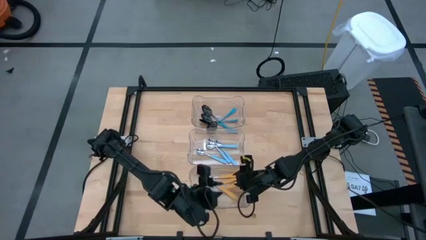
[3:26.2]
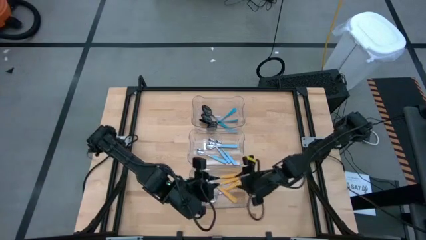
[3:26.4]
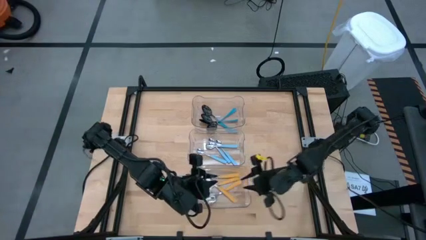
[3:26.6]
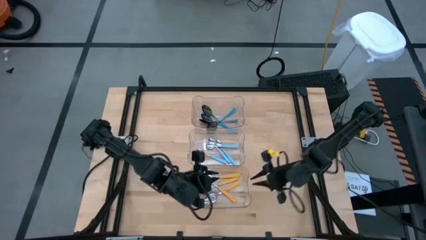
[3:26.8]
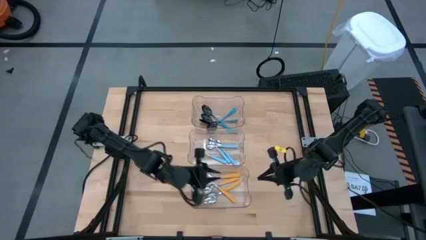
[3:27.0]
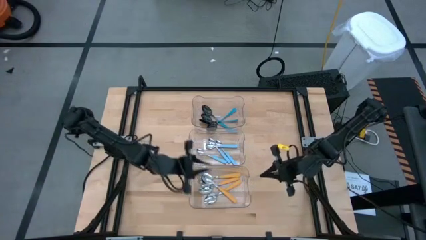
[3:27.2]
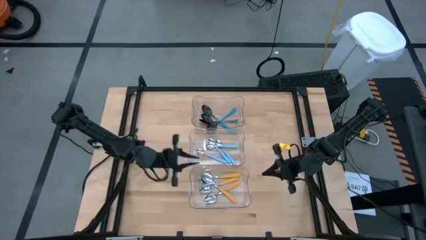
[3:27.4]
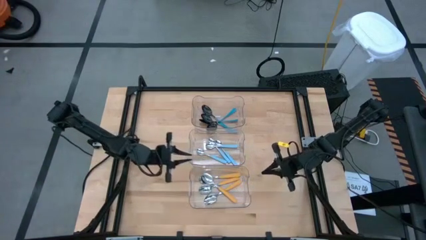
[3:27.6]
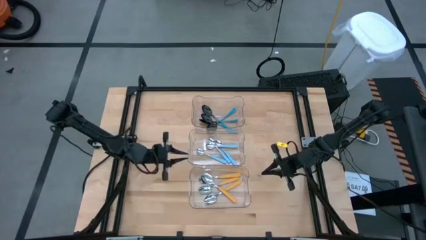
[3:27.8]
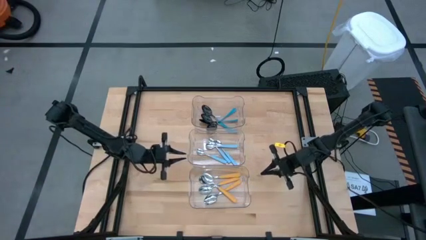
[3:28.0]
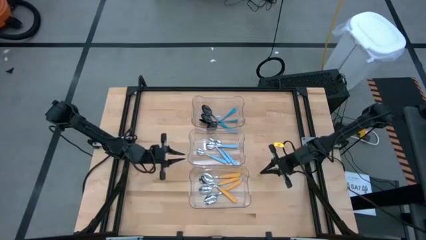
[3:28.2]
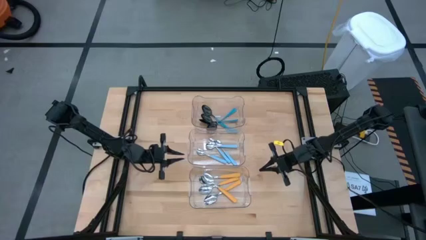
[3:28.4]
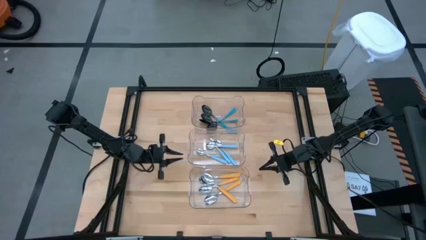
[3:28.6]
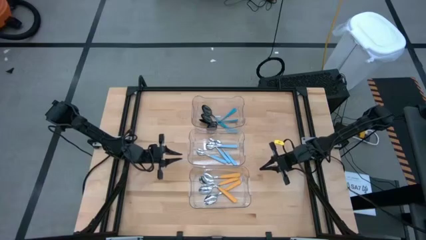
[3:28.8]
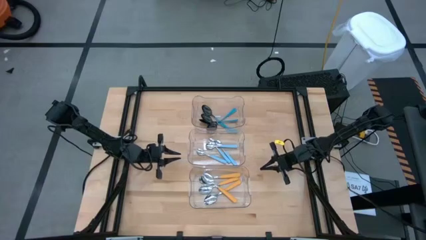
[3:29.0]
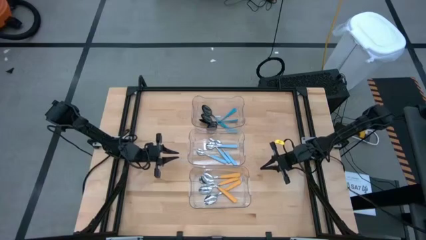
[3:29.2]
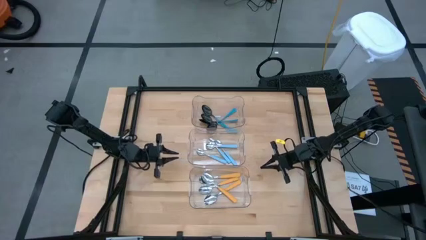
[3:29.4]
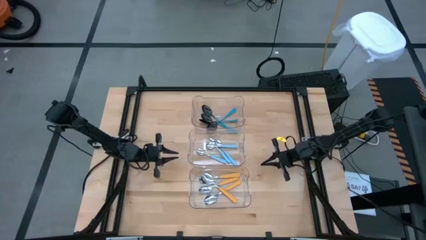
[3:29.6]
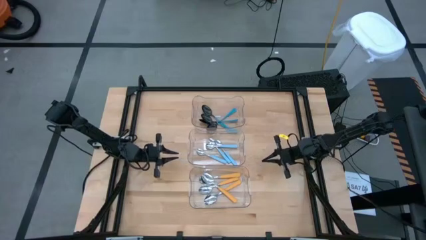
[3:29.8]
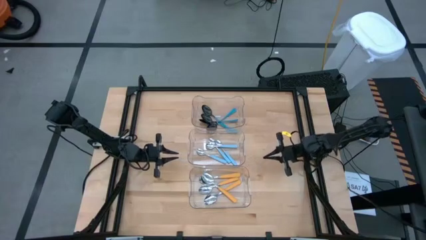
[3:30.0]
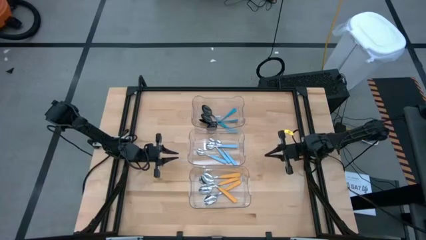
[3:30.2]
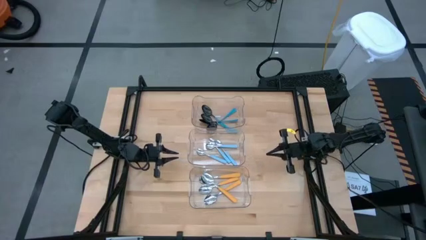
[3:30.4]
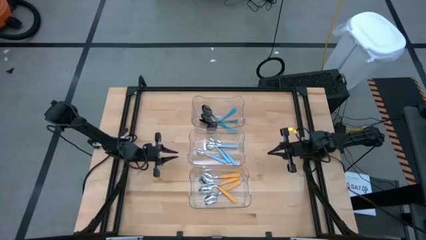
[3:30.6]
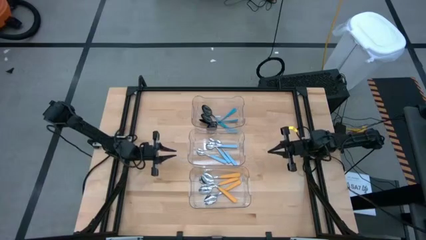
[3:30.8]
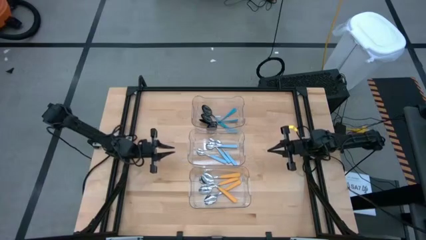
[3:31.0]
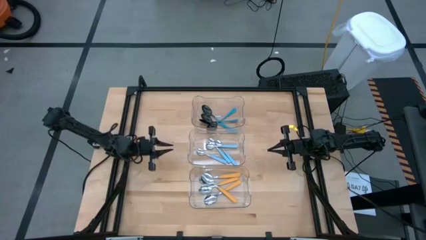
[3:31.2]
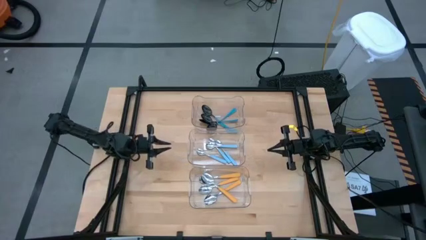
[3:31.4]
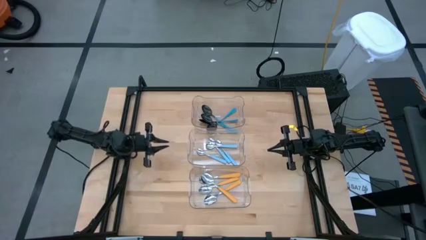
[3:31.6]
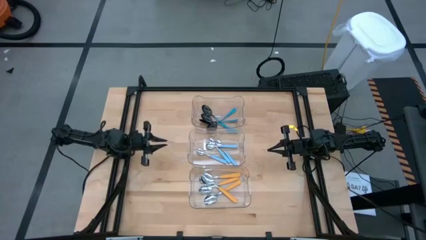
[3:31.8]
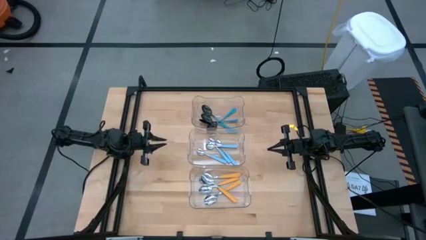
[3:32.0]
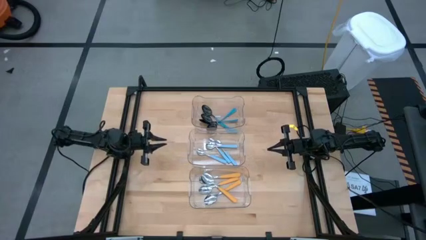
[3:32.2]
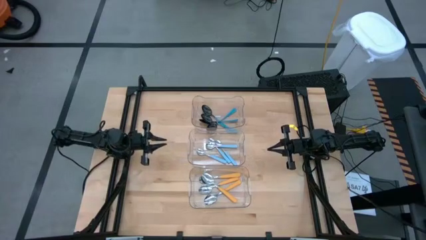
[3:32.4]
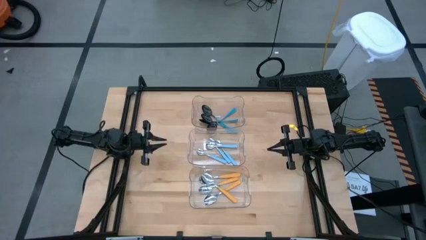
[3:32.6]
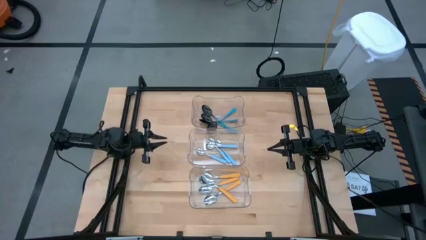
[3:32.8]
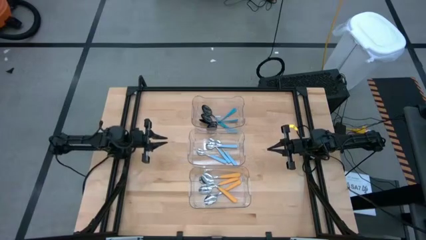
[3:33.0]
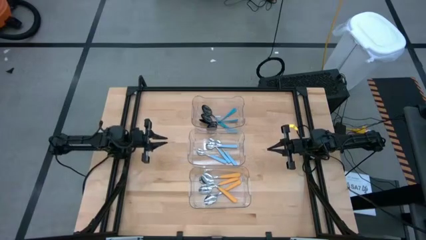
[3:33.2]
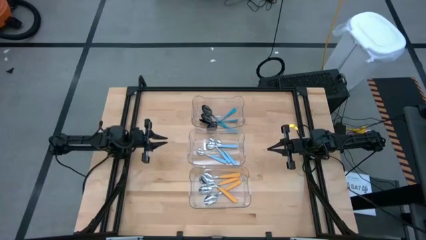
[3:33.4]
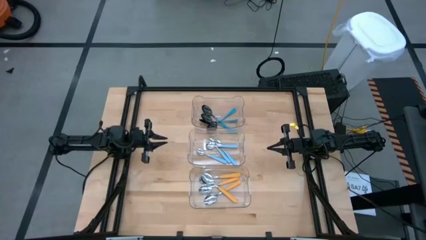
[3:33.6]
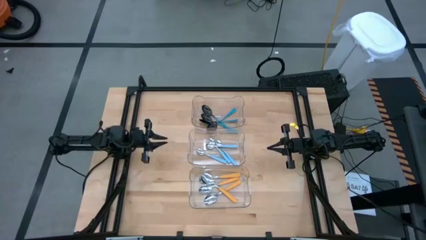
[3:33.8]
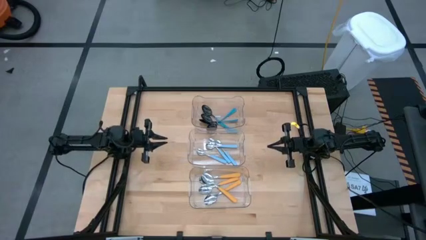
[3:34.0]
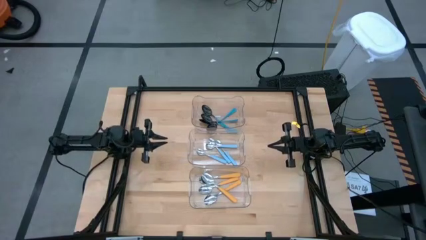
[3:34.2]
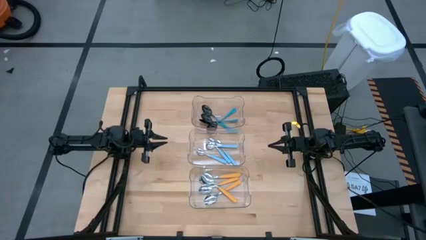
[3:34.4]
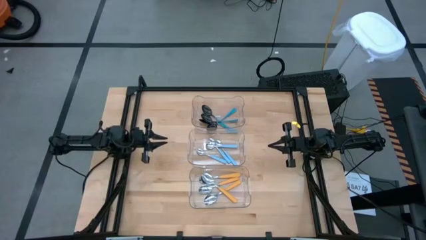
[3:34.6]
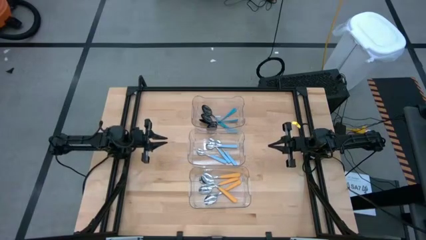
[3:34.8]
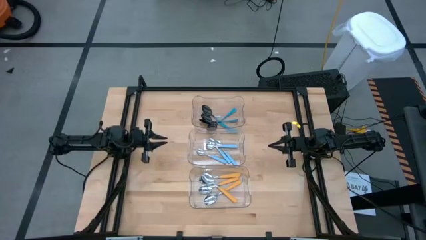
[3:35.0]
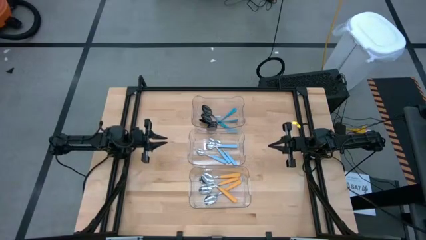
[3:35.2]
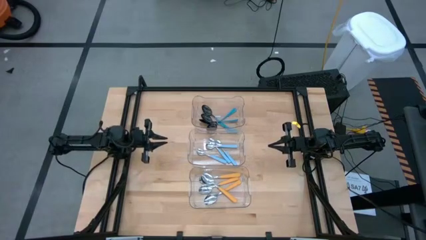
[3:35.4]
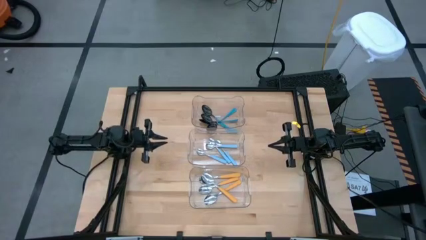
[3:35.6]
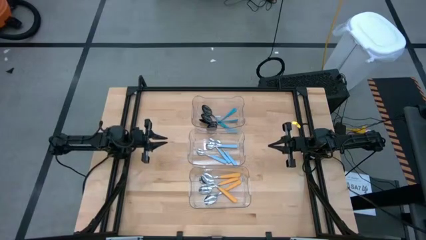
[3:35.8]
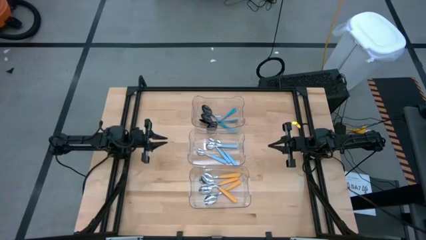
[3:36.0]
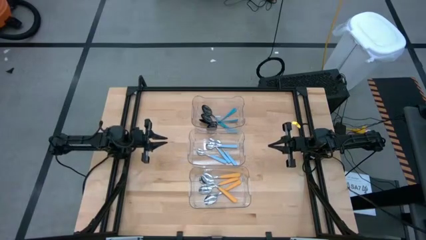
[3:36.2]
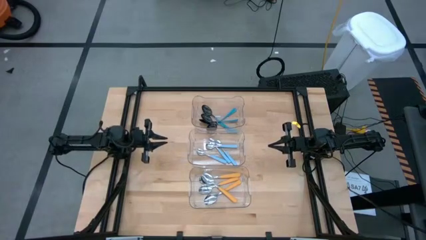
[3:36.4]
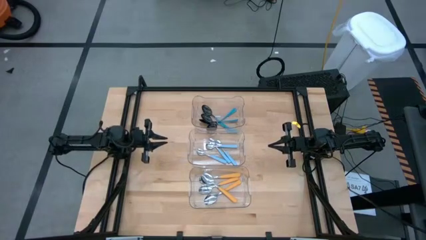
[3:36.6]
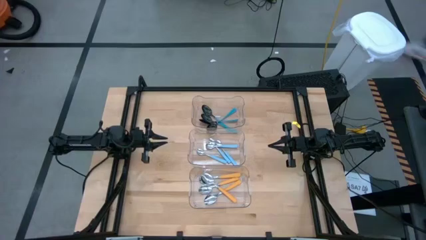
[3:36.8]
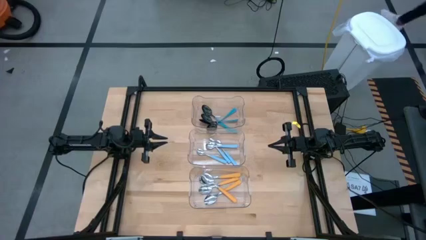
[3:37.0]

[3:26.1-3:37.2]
Task: Sort silverware by color (type)
Return to Home Position

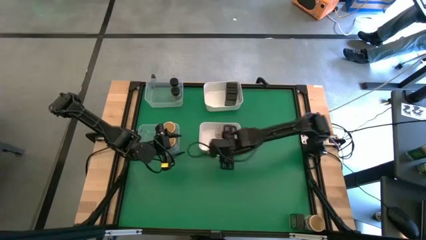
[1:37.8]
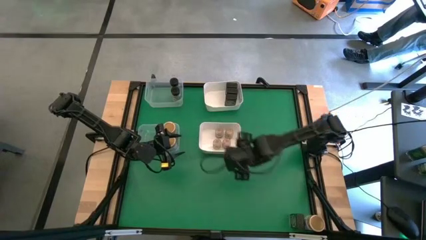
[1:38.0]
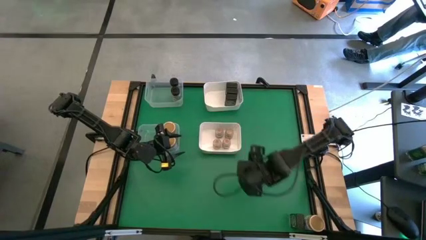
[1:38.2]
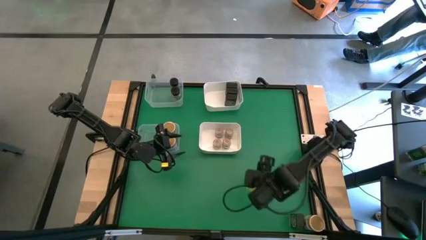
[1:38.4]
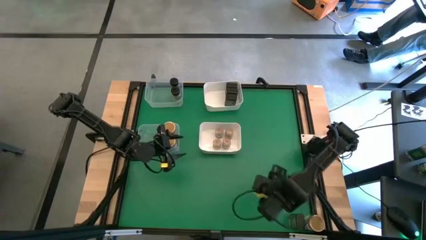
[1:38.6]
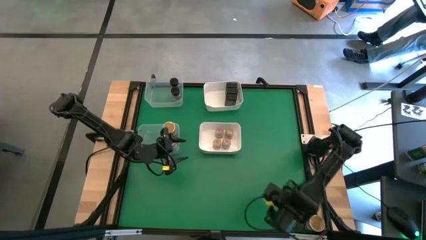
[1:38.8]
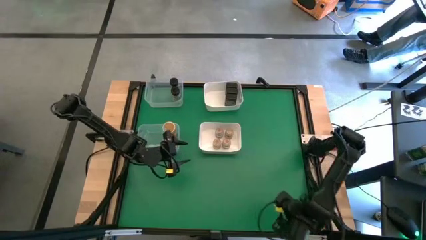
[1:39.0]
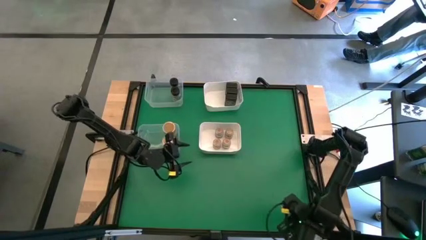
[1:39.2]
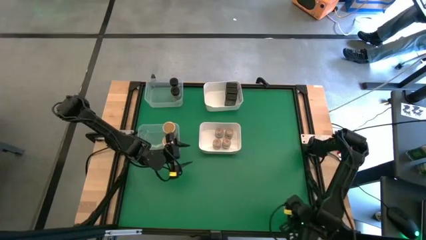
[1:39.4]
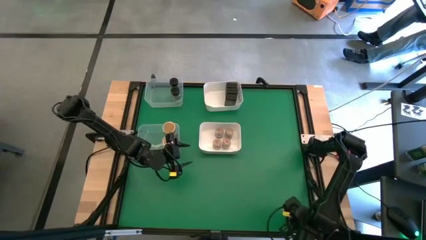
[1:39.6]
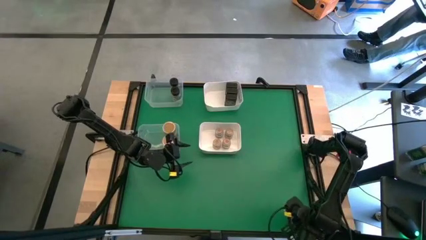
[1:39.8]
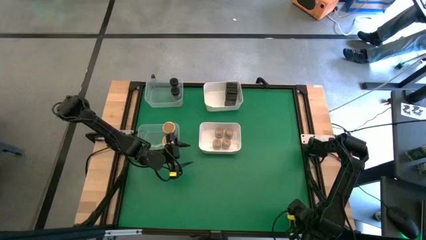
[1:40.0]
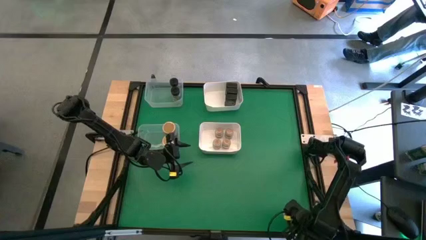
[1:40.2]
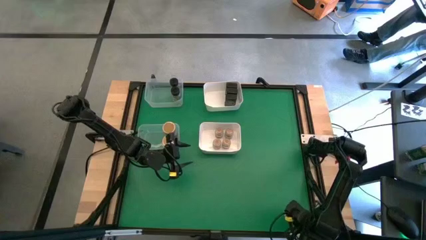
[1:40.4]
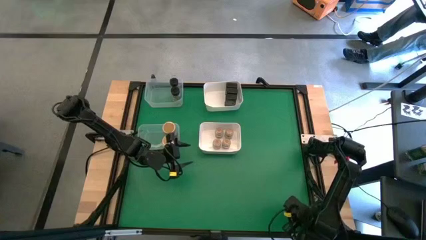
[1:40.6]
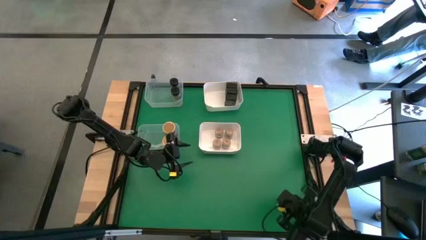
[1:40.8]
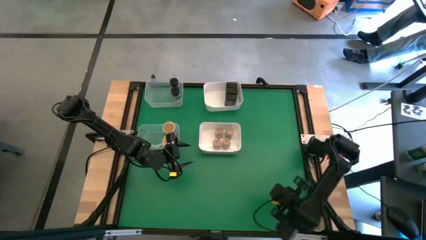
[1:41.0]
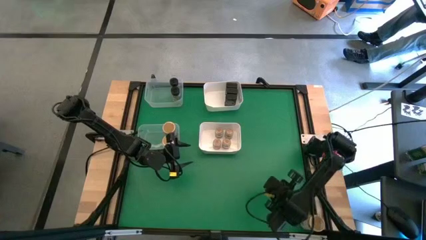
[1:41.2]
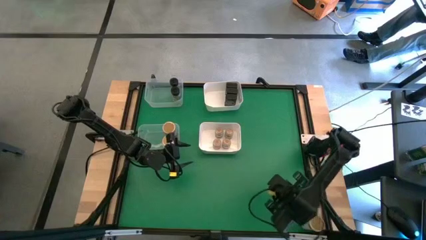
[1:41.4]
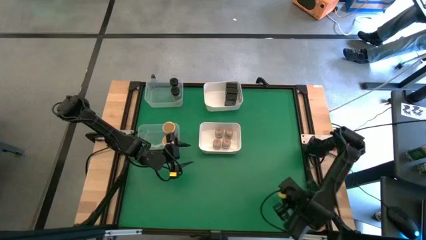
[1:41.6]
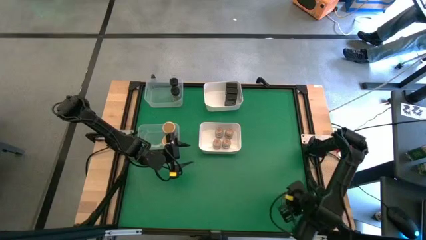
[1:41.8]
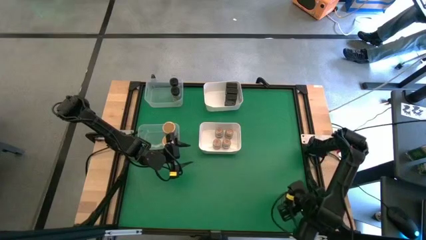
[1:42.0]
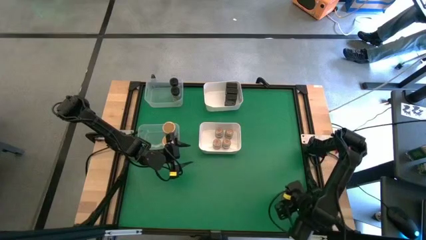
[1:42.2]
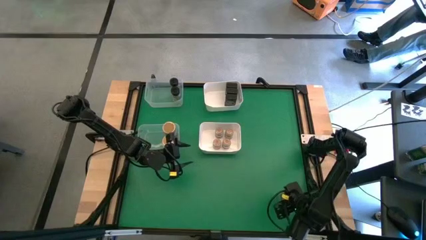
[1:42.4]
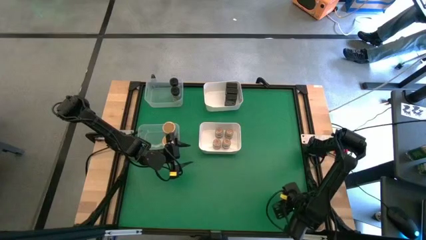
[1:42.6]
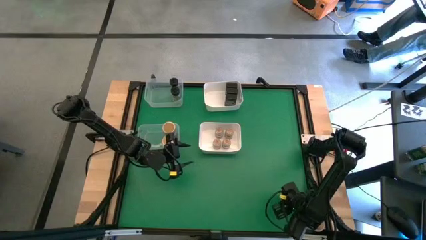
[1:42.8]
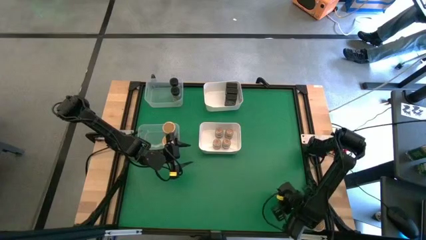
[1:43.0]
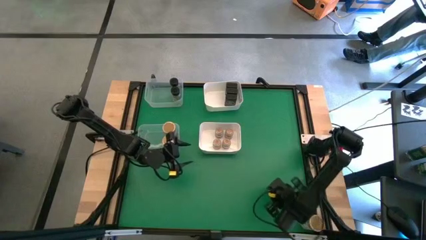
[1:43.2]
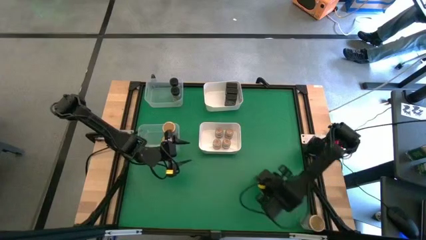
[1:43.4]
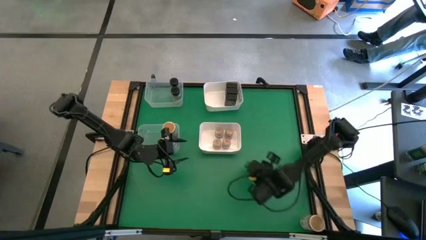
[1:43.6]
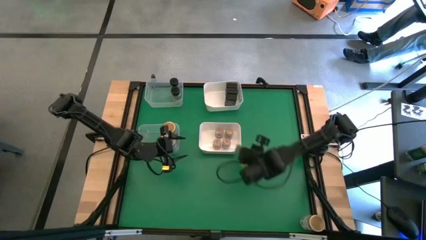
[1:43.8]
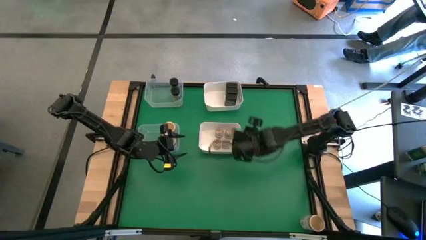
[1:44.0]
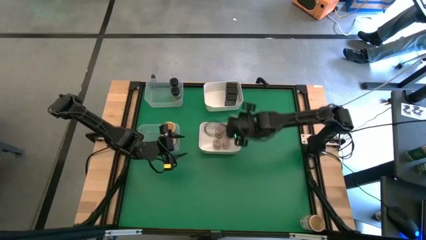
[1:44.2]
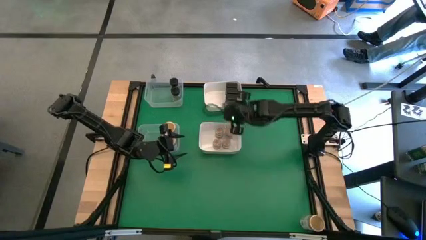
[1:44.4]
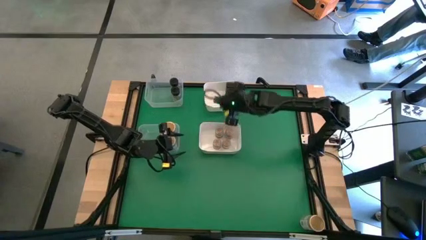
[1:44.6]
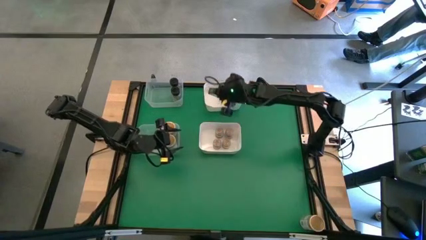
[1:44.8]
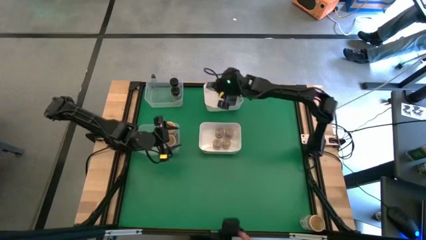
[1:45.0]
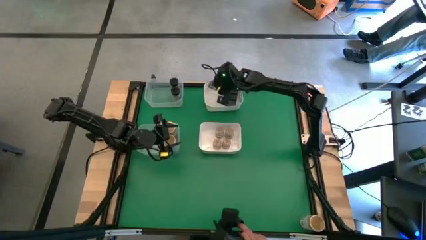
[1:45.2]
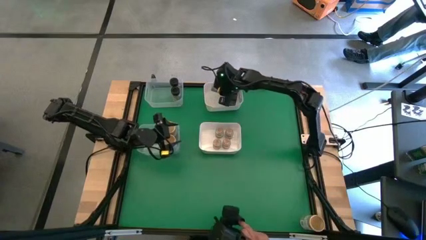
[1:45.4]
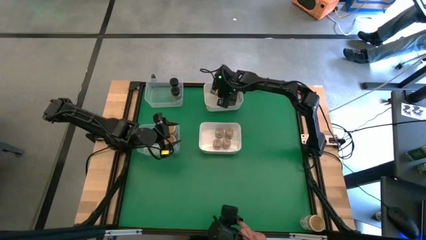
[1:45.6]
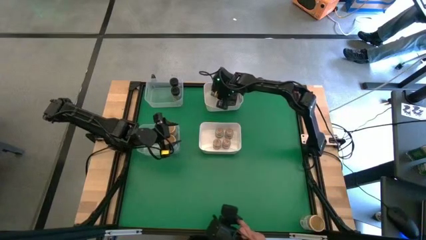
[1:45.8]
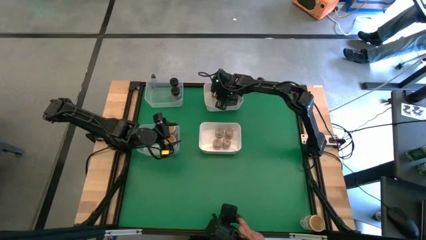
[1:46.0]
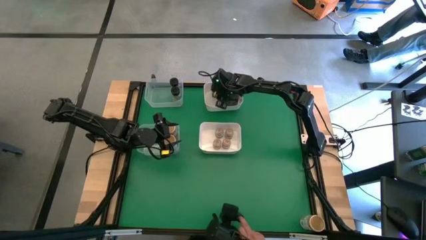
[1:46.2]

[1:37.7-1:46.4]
Task: Sort spices by type
Put the black seasoning can into the top white bin
